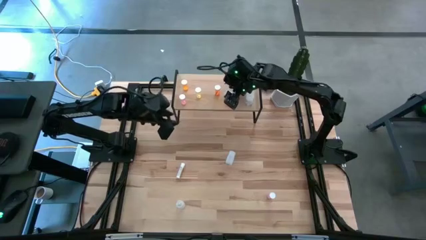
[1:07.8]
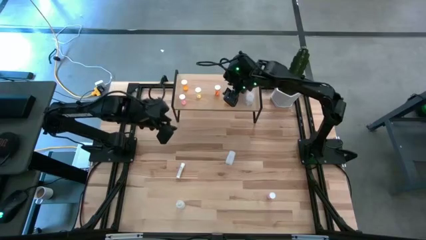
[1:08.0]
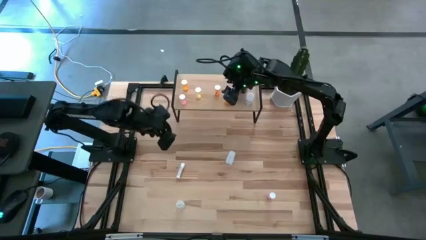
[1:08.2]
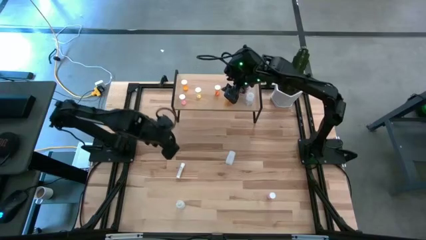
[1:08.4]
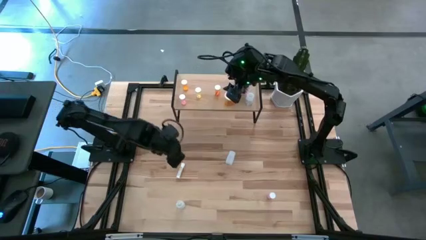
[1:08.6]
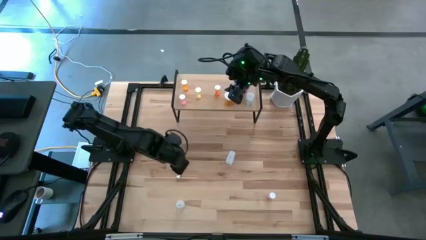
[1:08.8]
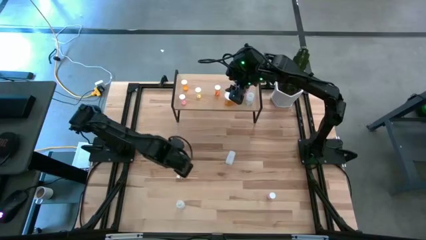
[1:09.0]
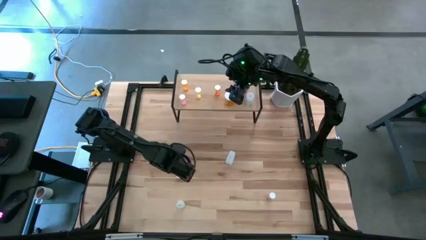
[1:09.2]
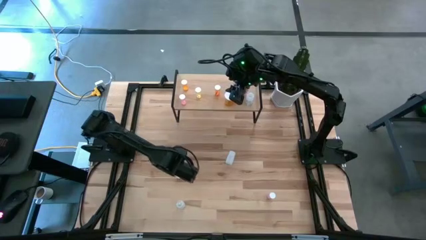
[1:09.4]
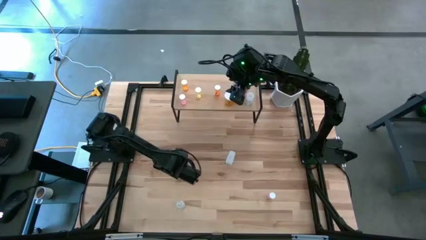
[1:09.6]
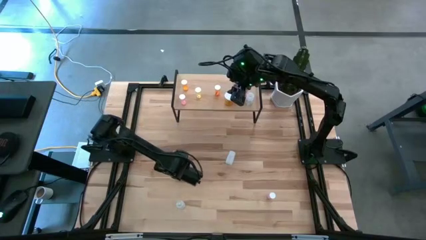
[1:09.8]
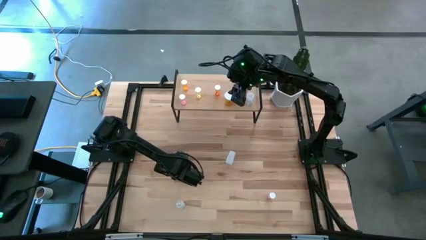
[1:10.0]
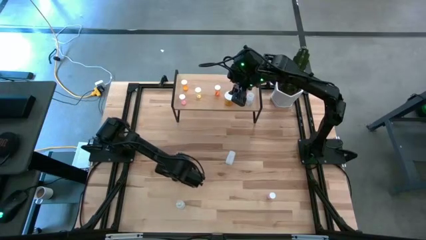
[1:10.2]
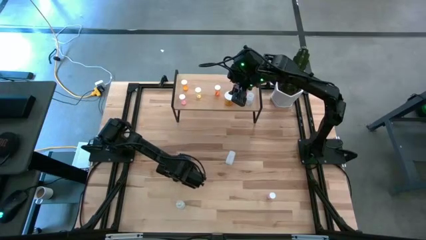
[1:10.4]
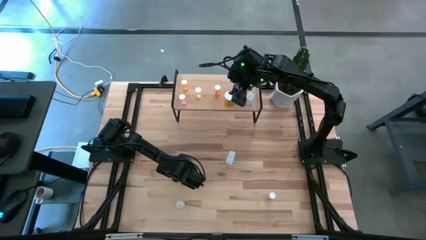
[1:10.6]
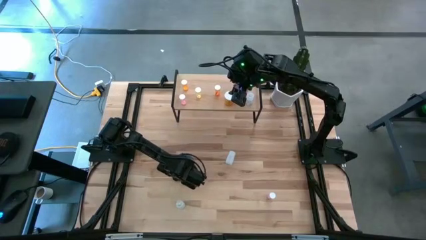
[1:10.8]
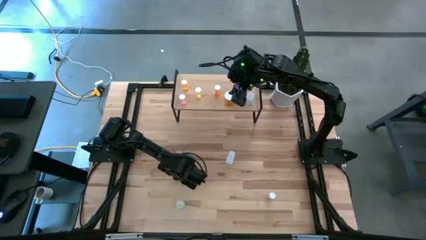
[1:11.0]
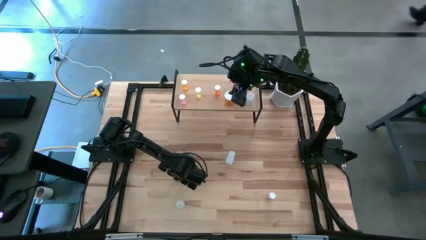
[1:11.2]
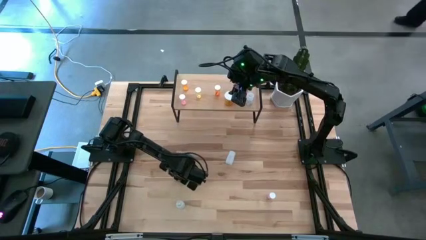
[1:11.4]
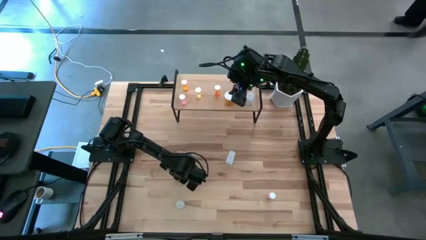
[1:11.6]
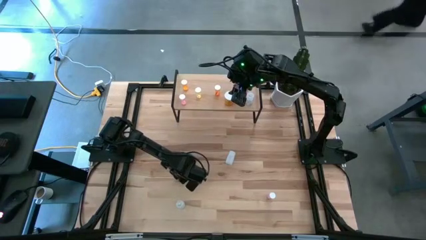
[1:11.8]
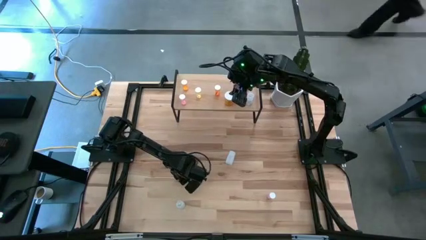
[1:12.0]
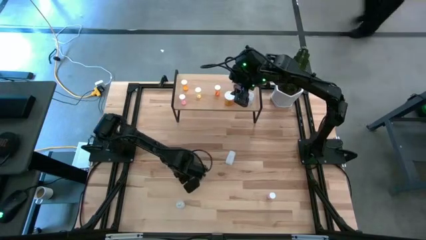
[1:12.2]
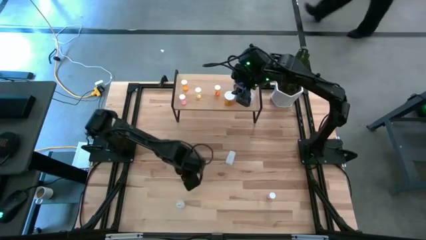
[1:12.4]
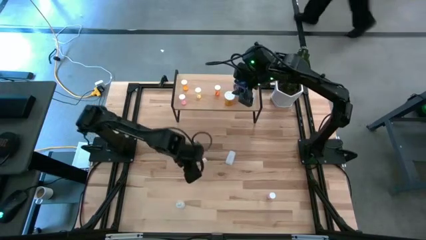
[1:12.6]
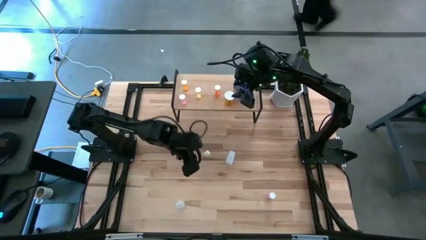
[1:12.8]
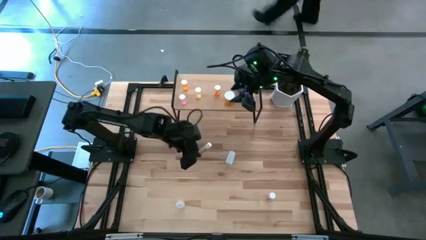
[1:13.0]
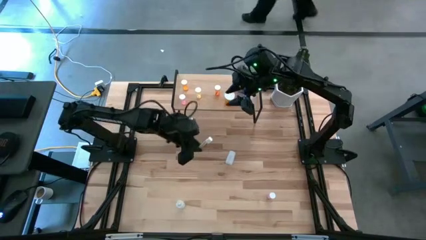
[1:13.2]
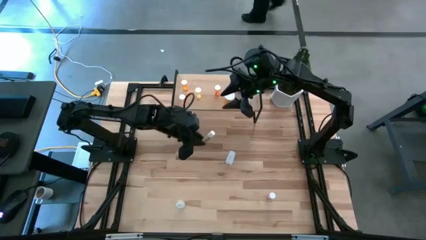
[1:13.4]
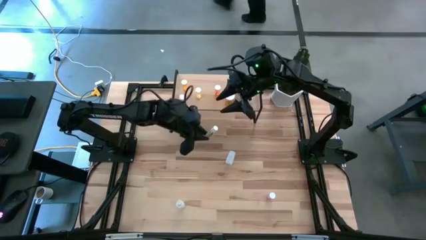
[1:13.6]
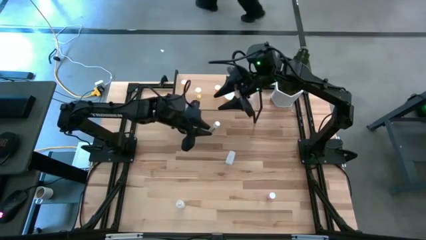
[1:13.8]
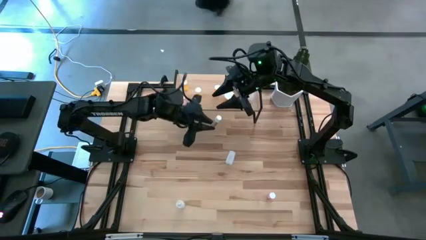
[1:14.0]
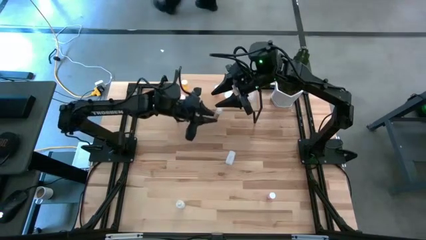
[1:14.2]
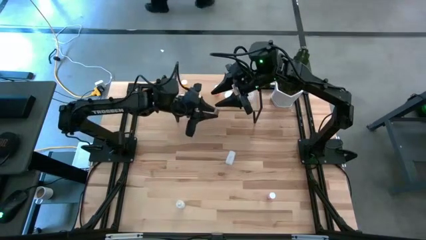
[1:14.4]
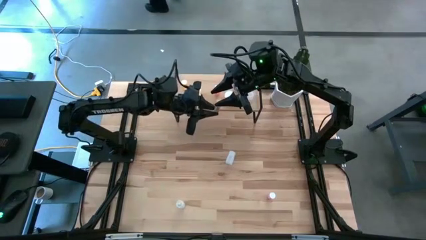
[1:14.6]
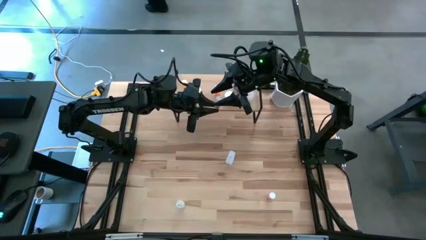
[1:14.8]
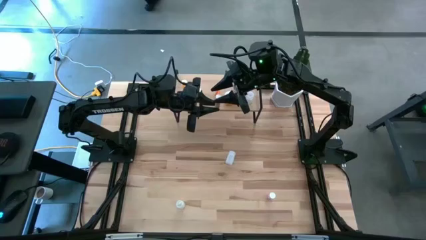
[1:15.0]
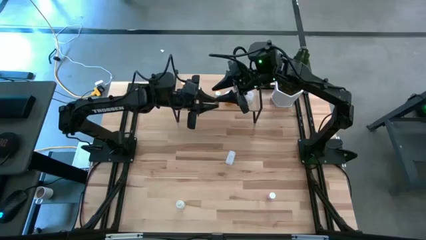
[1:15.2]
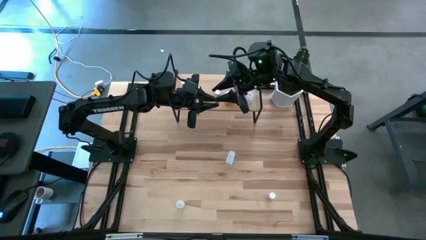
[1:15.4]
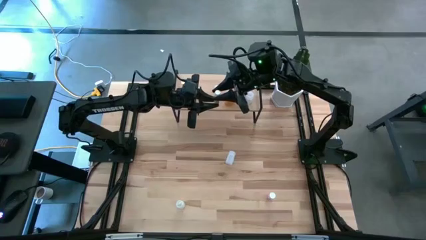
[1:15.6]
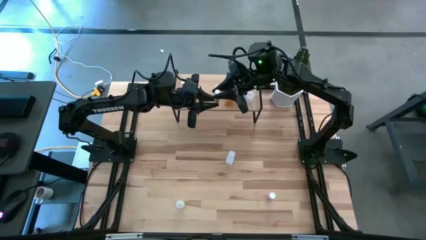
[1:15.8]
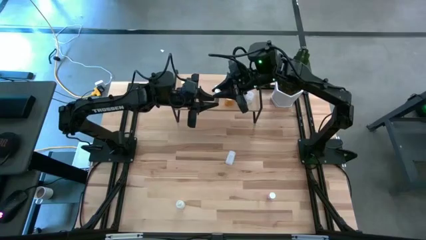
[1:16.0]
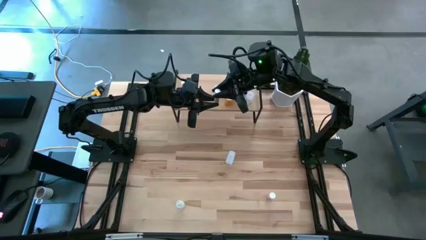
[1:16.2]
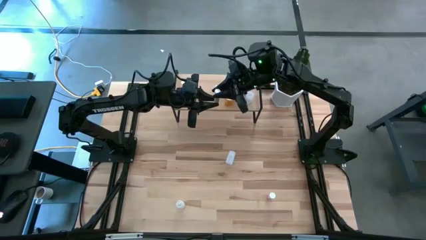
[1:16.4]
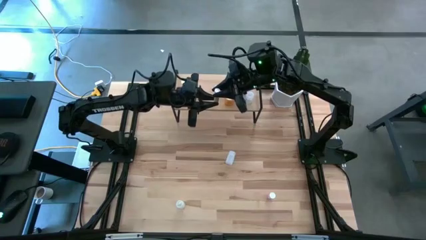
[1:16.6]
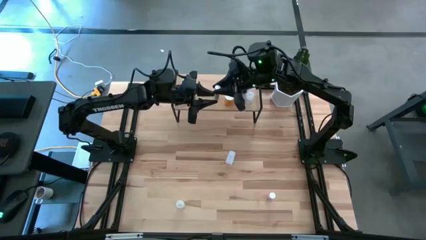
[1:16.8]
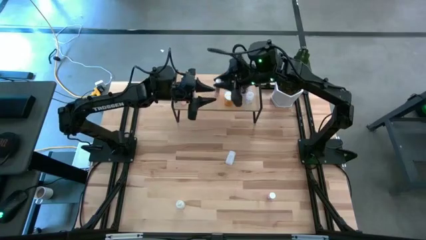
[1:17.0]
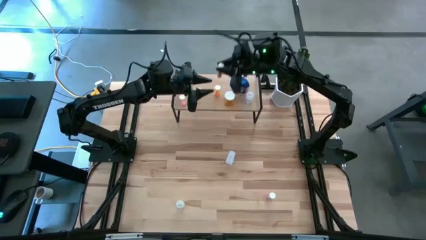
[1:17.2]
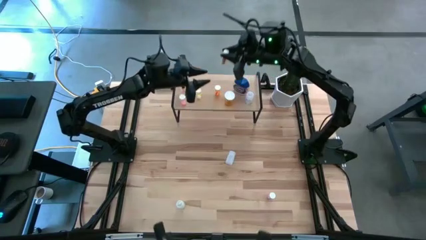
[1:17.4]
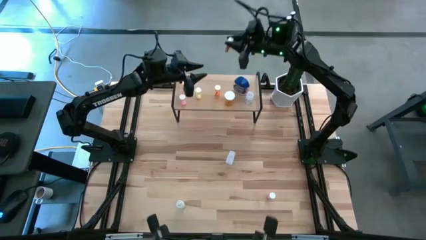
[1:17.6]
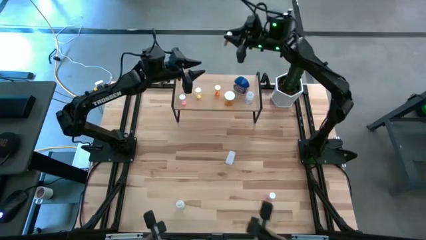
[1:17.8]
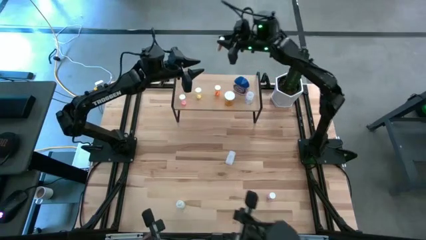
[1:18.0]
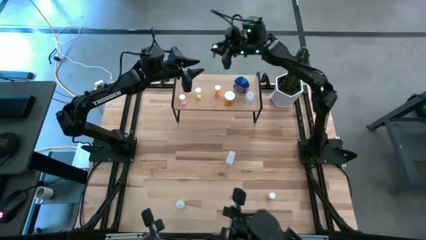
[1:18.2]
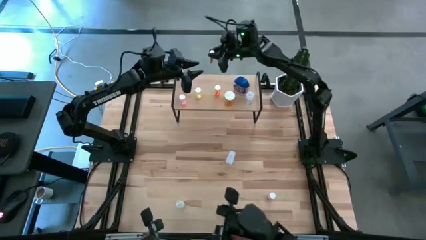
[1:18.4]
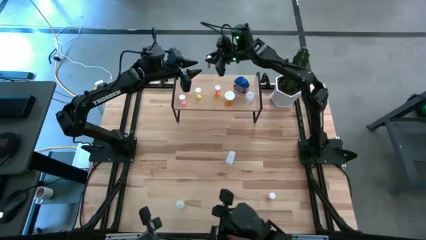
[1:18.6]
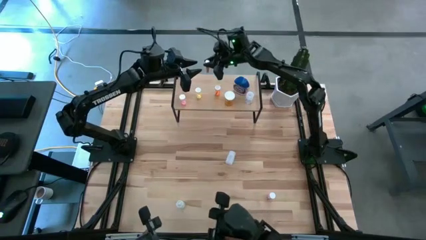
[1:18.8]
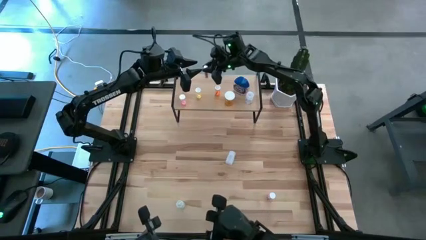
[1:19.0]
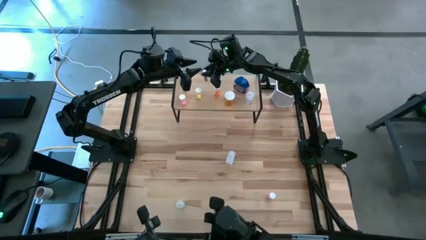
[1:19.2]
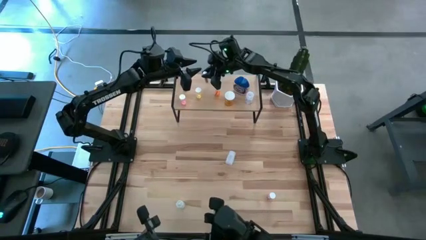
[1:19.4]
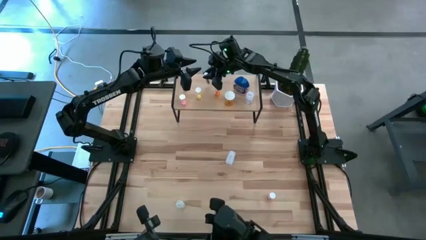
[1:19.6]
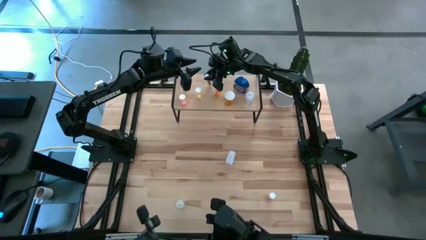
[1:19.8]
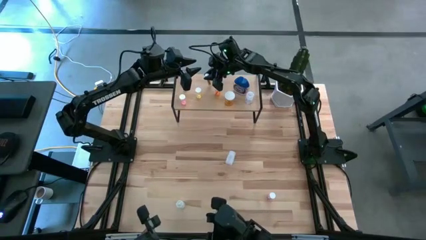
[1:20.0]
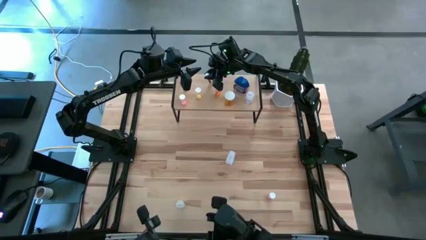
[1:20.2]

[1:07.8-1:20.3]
Task: Pick and place medicine bottles onto shelf by color
Put the white yellow pill bottle on the shelf

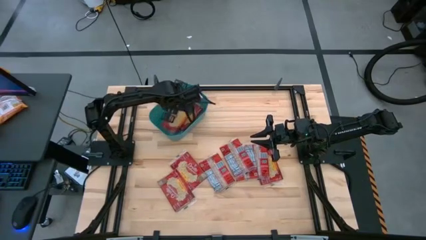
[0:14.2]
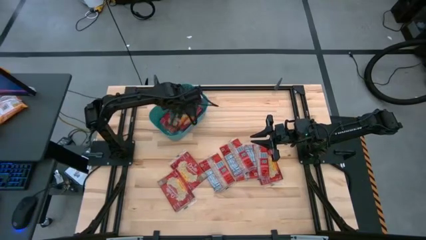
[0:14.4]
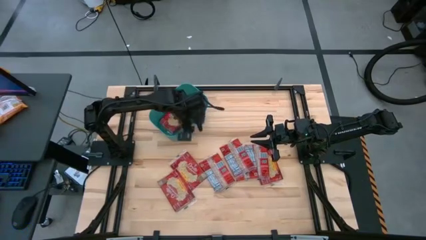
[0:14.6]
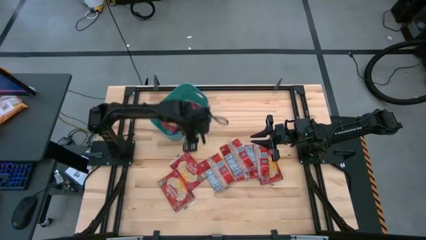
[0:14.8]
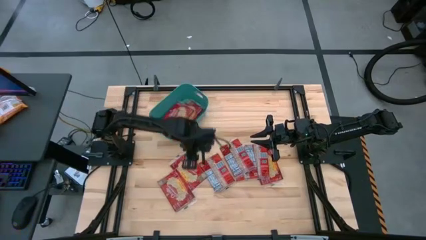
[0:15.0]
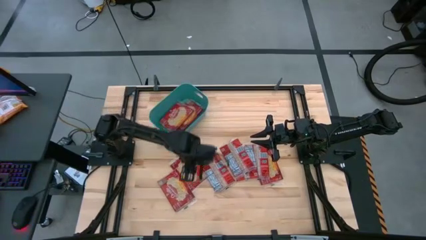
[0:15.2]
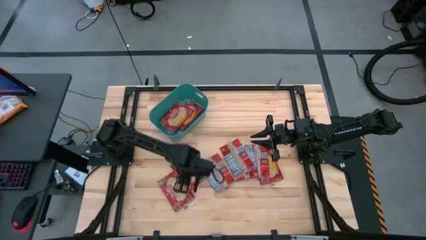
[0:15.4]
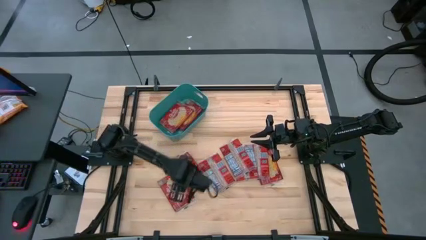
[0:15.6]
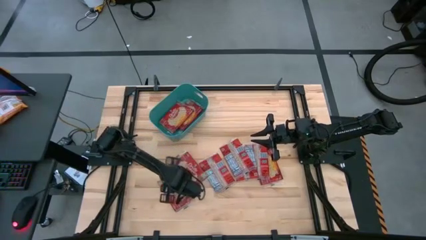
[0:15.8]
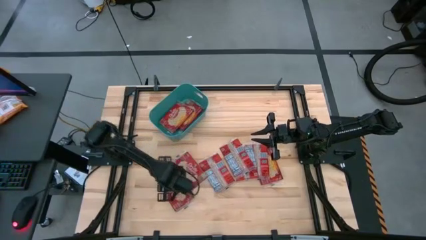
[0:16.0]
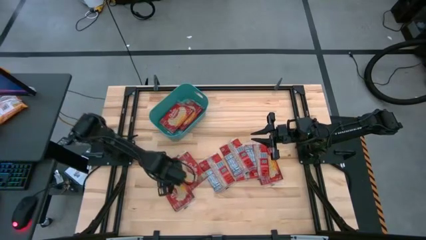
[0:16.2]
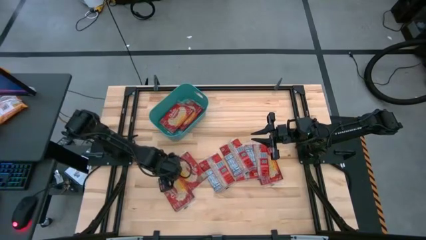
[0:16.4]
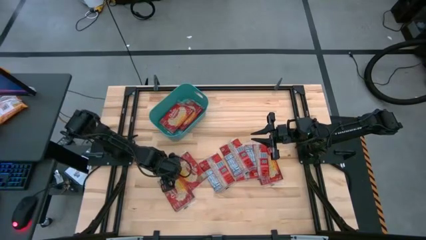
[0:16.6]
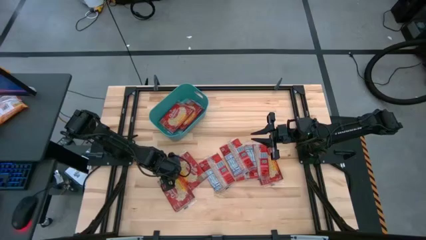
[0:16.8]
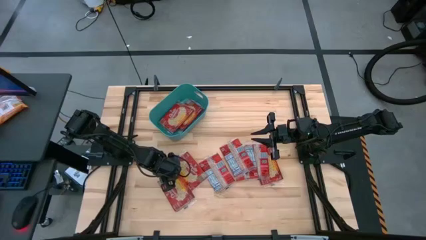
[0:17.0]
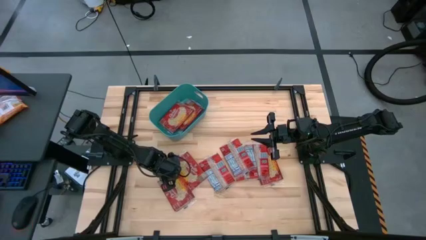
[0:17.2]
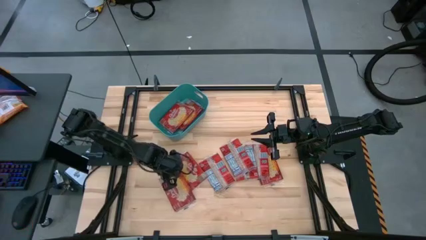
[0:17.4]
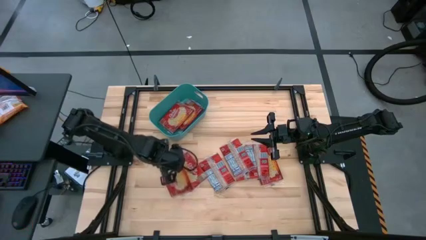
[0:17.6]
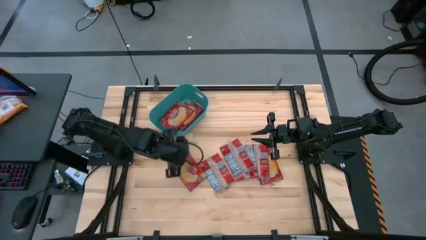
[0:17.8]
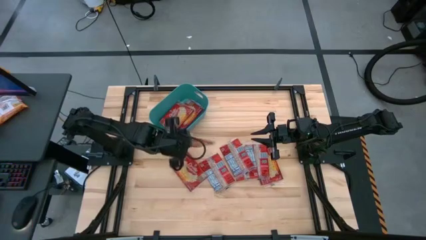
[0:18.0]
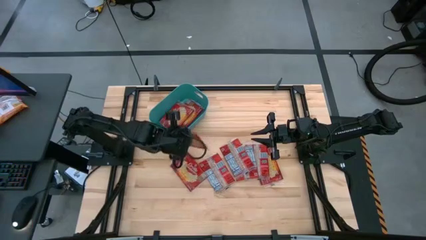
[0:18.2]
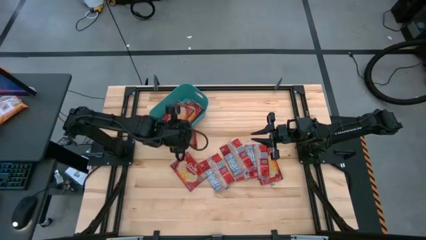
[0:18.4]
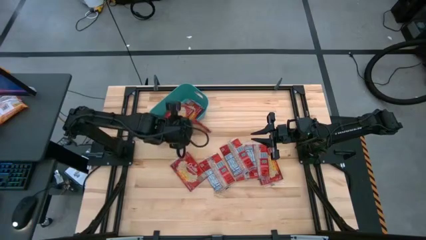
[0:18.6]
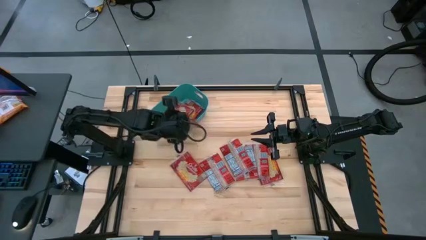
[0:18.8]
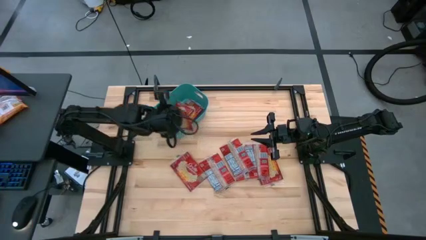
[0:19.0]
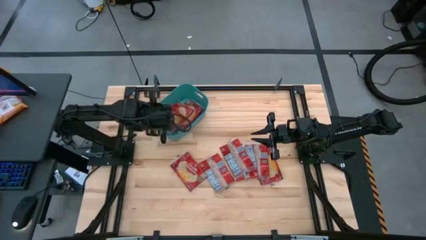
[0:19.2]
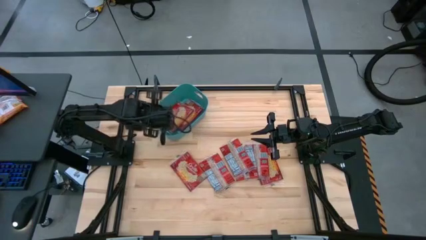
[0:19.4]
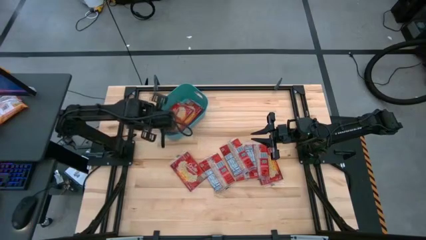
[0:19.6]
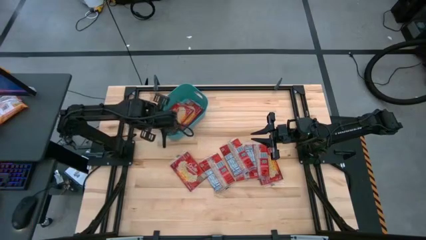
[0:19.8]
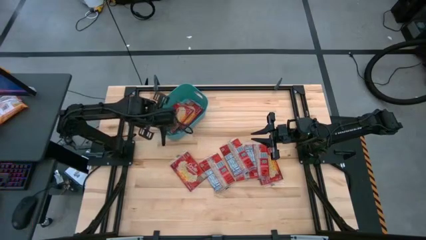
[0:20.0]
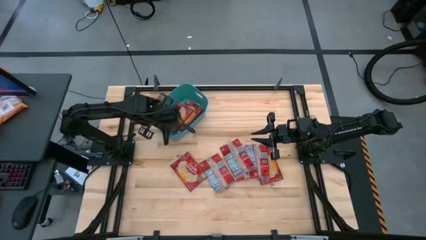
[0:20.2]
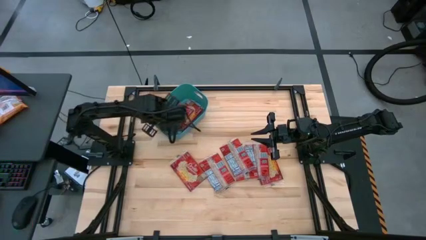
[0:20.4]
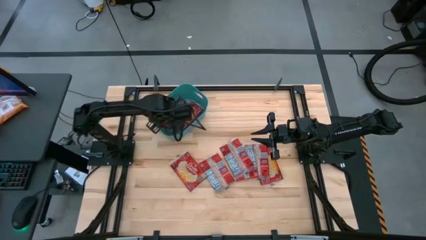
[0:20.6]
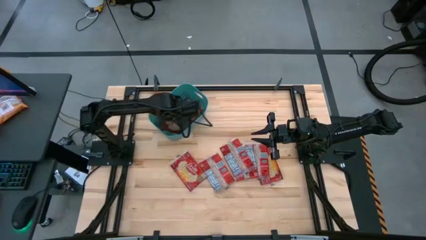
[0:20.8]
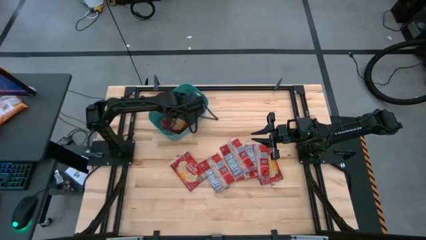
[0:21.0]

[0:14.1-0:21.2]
Task: Sort popcorn bags into baskets
Put the red popcorn bag into the blue bin
